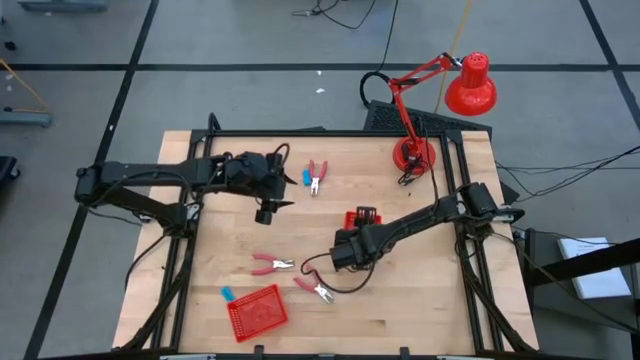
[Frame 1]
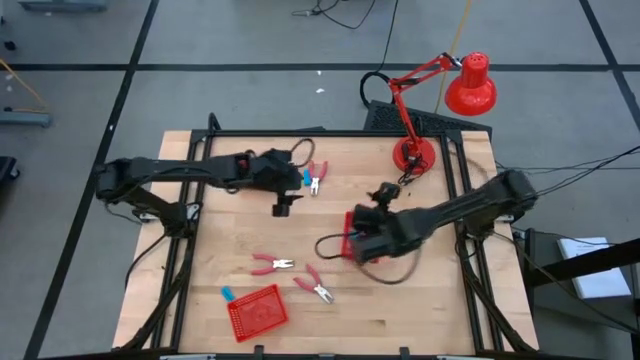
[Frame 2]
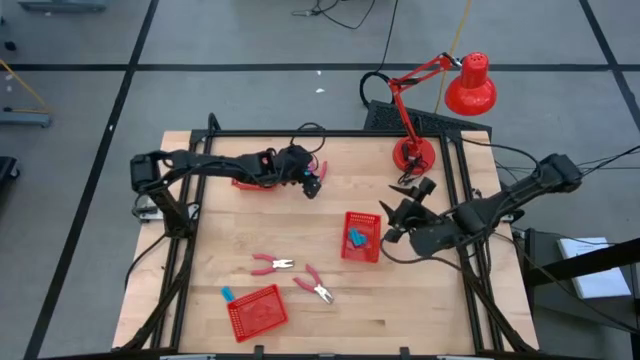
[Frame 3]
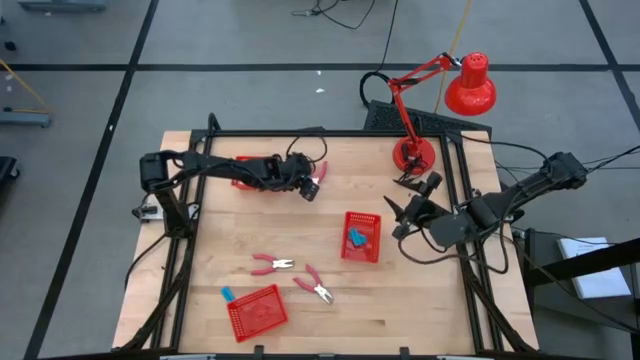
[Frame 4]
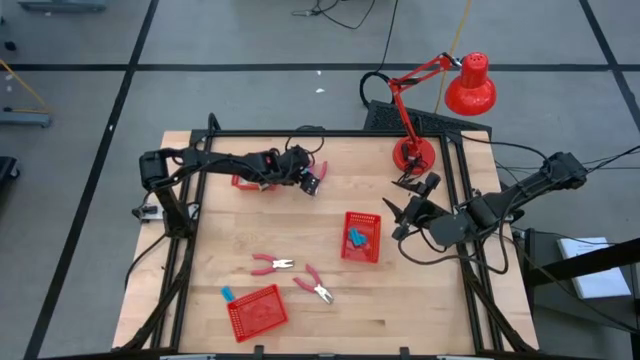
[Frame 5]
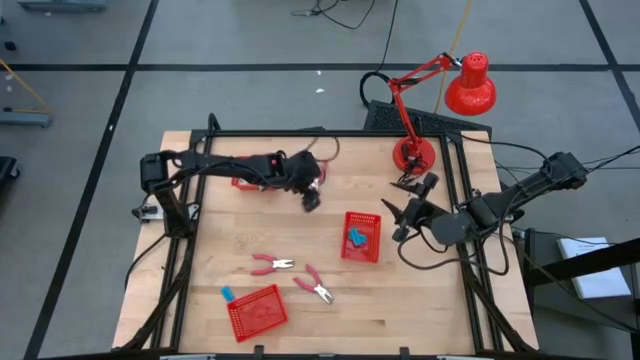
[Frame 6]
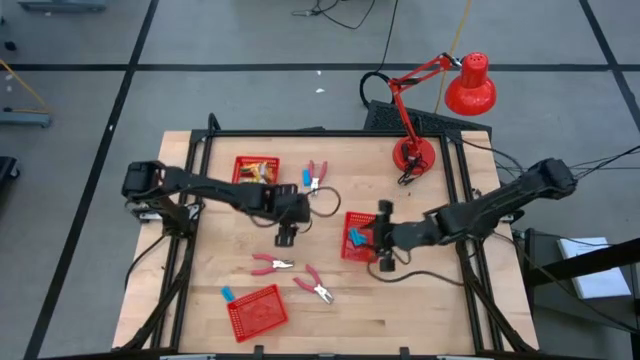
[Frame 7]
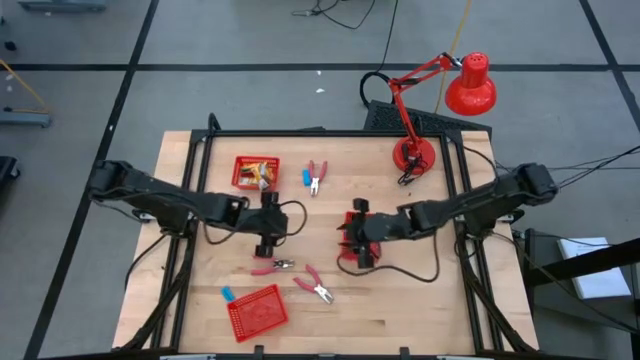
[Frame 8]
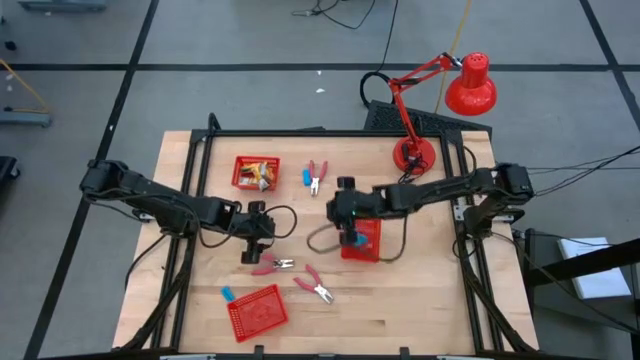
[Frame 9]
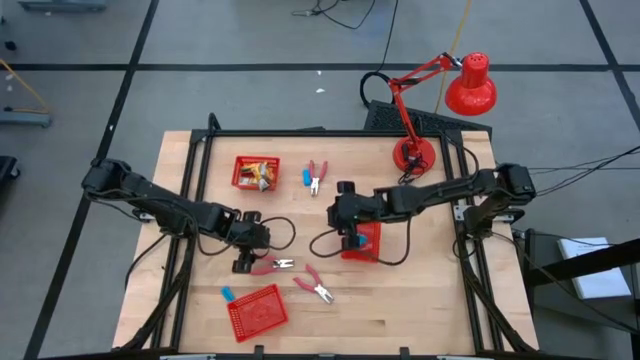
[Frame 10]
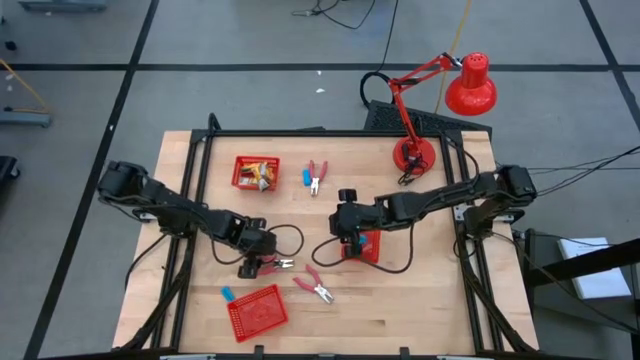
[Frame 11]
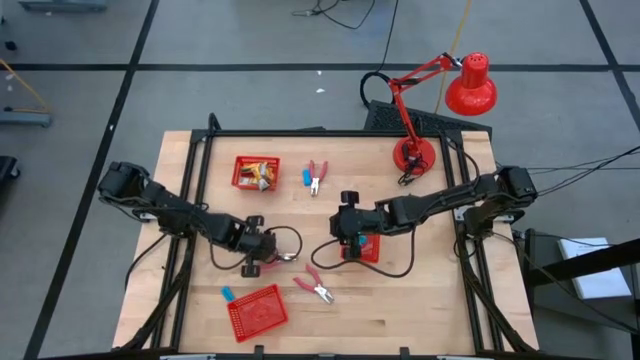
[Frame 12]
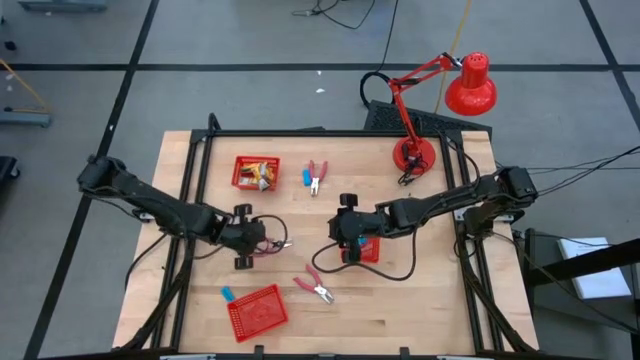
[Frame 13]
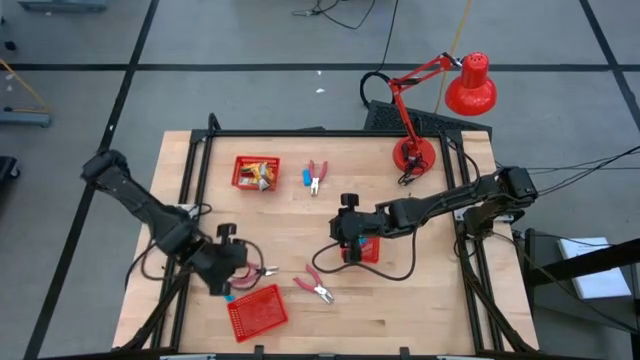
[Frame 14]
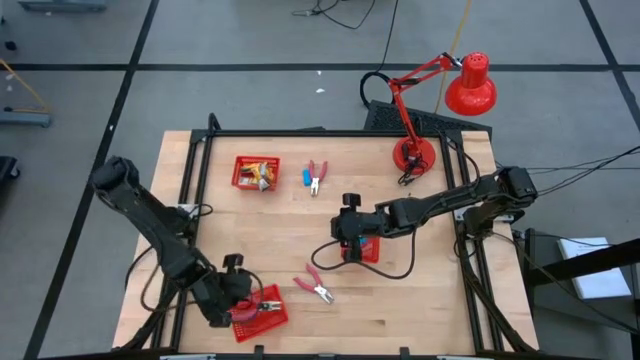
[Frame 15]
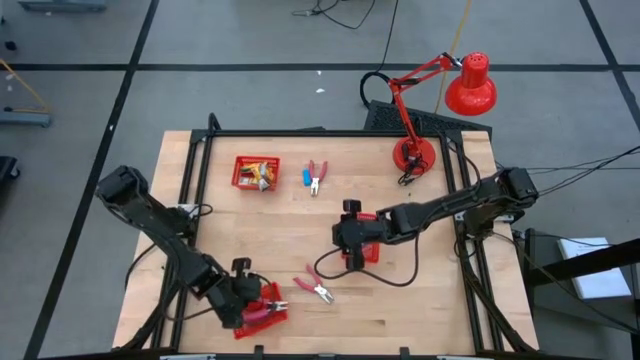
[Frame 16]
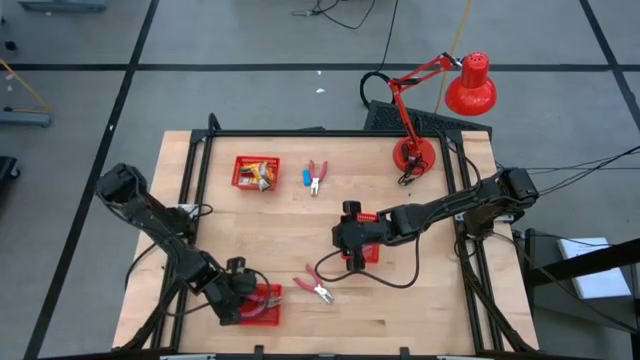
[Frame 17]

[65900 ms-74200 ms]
Task: Pick & Place School Supplies
Put the pink hole puncher into the bottom red basket

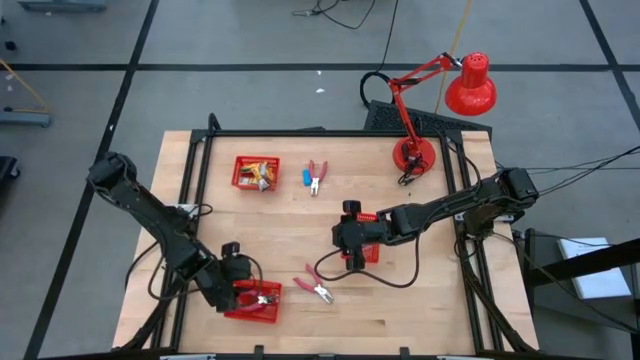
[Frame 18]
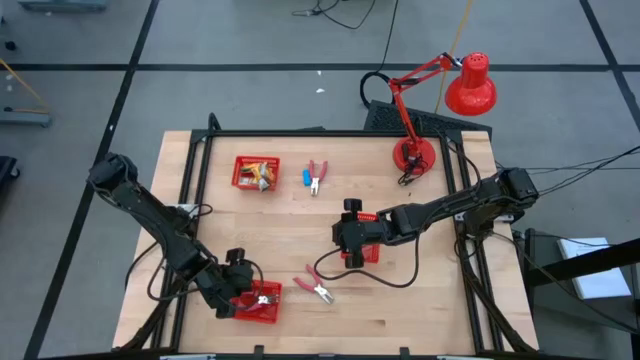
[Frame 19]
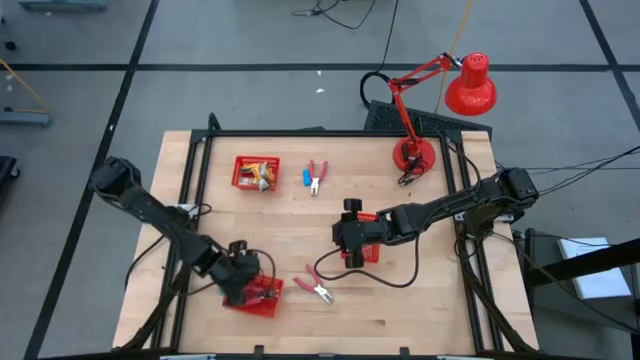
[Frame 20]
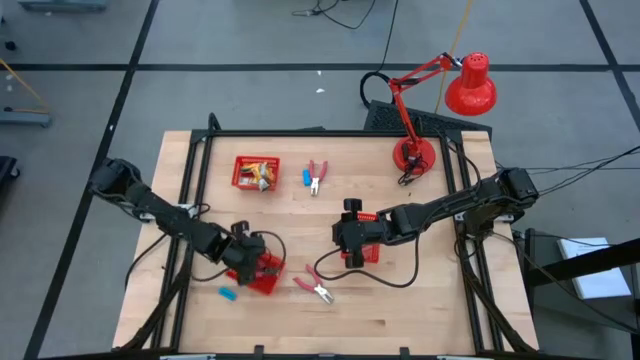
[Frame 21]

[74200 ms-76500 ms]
Move the bottom red basket to the middle left of the table

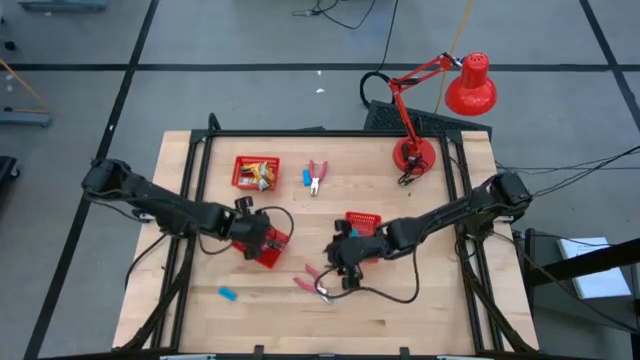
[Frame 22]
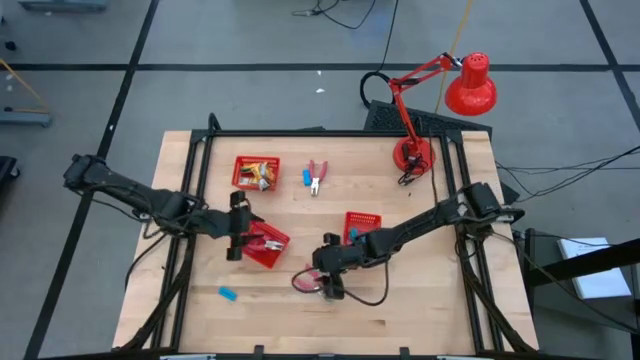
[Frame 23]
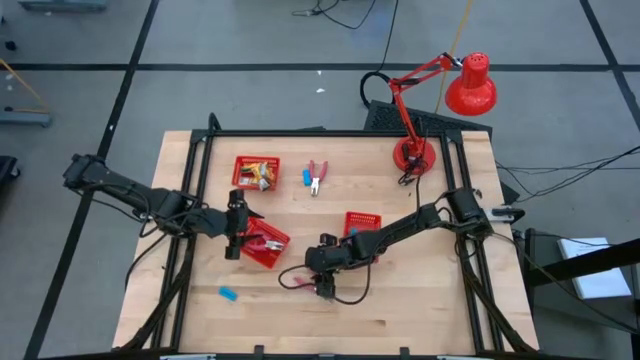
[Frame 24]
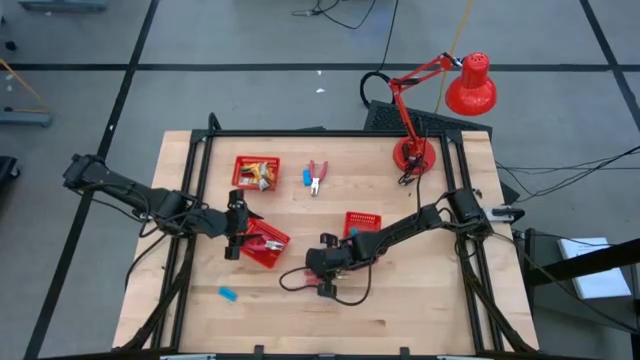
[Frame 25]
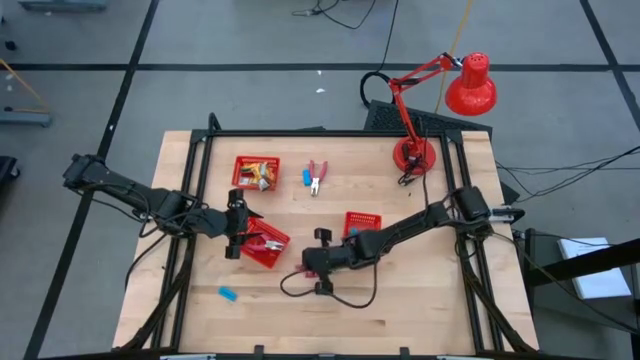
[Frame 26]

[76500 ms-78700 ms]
Put the pink hole puncher into the bottom left red basket

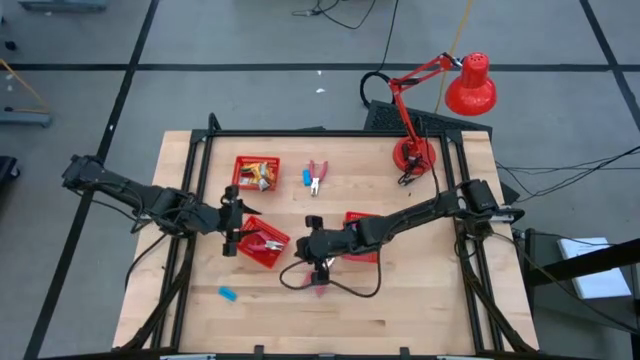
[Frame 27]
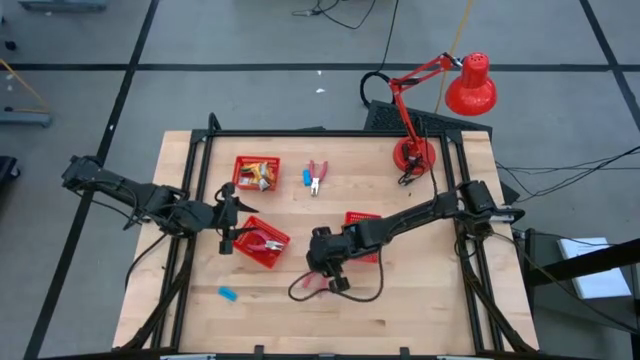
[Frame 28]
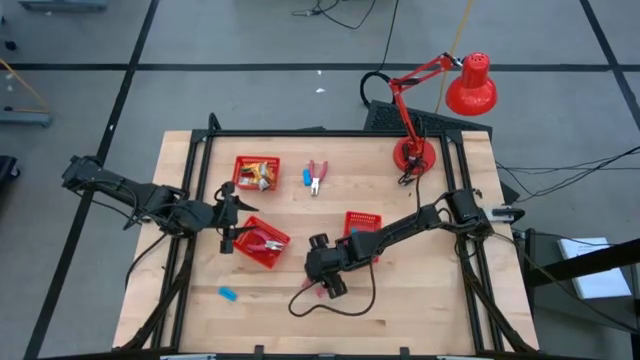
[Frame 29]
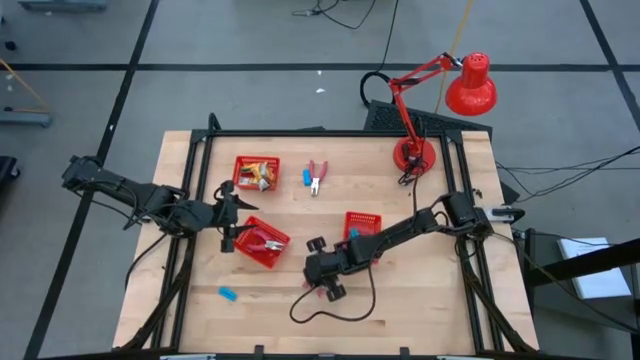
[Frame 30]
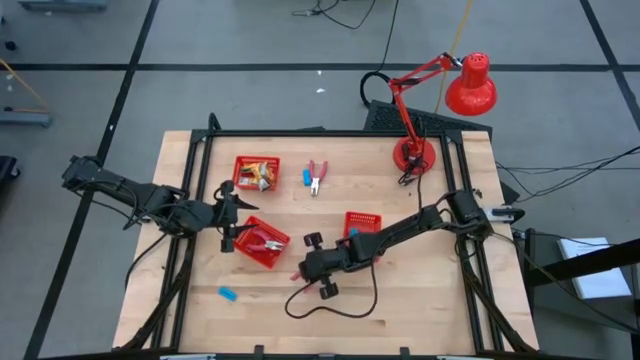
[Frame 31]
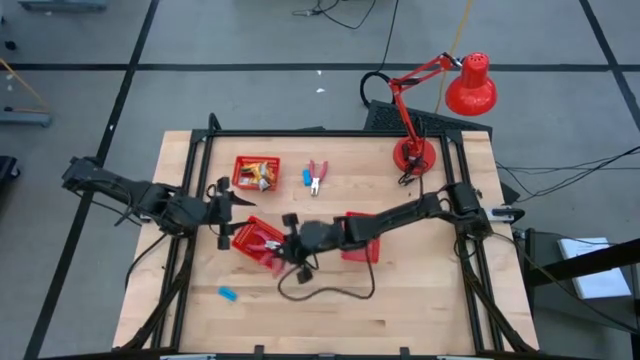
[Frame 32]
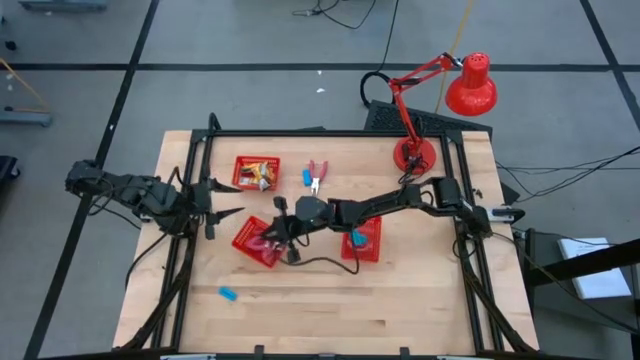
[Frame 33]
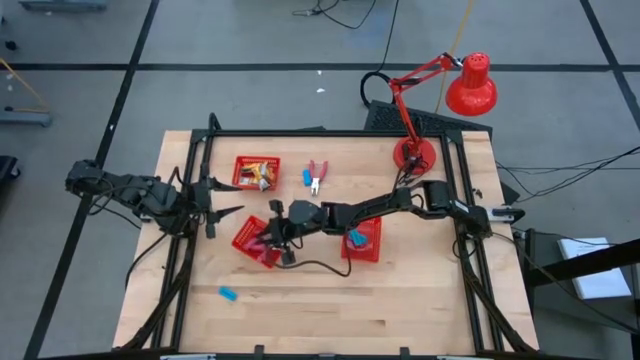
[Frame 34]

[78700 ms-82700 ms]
Put the pink hole puncher into the bottom left red basket

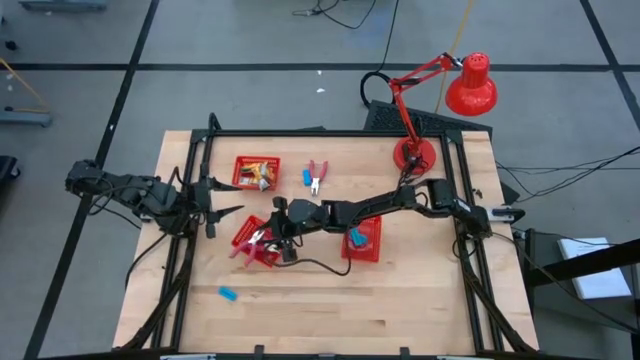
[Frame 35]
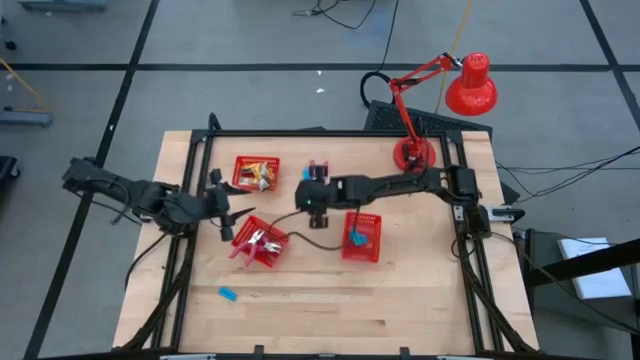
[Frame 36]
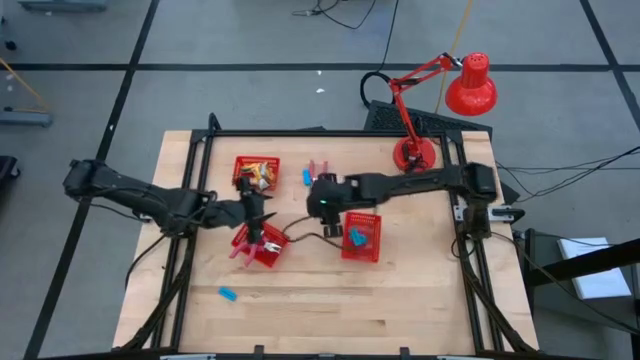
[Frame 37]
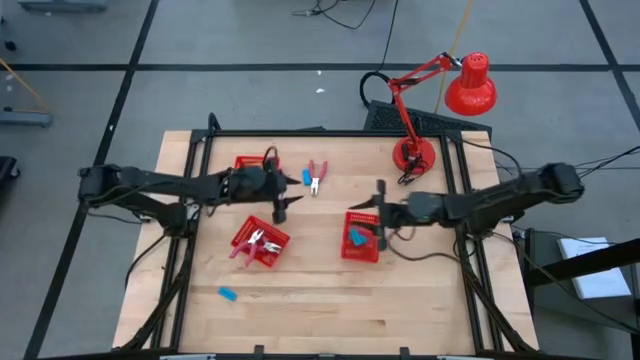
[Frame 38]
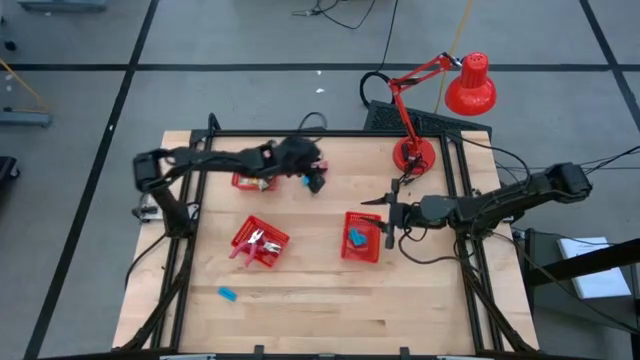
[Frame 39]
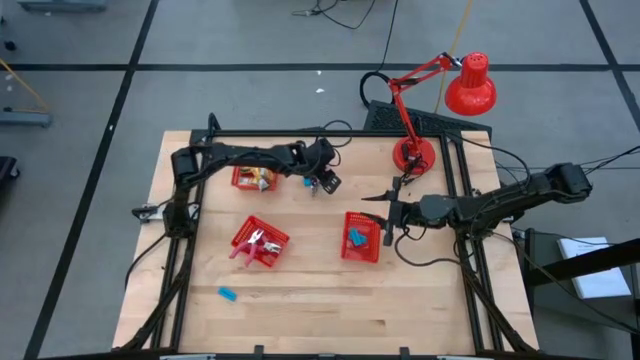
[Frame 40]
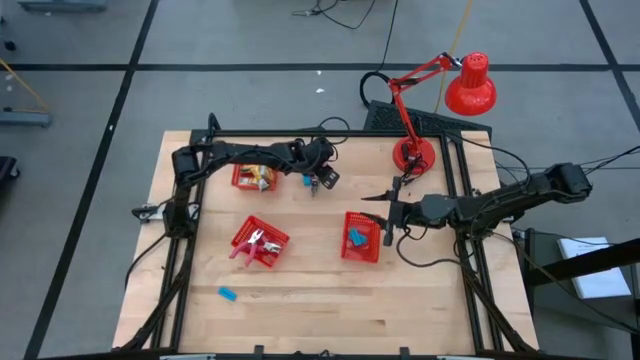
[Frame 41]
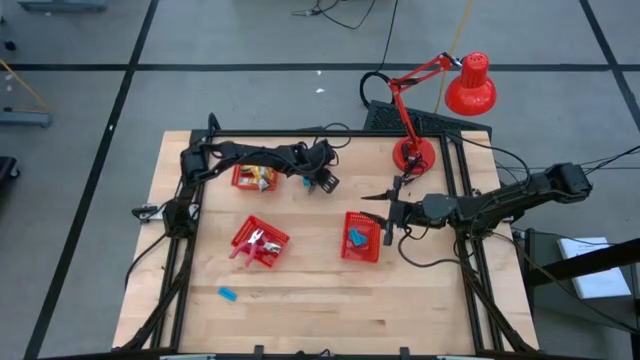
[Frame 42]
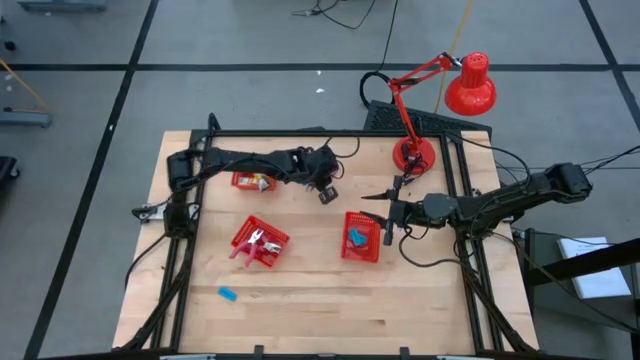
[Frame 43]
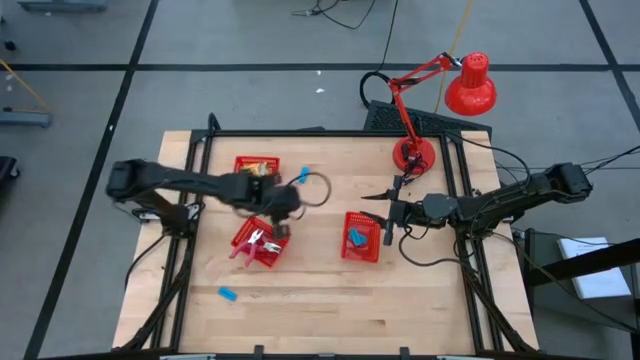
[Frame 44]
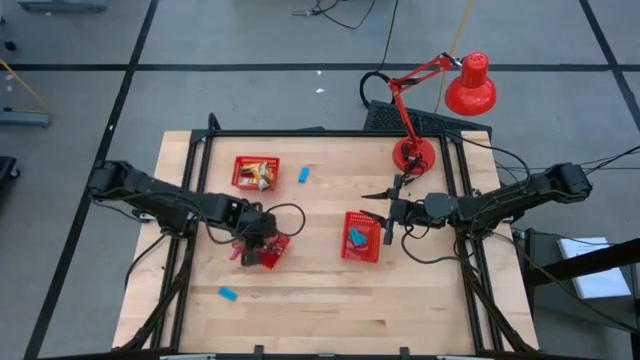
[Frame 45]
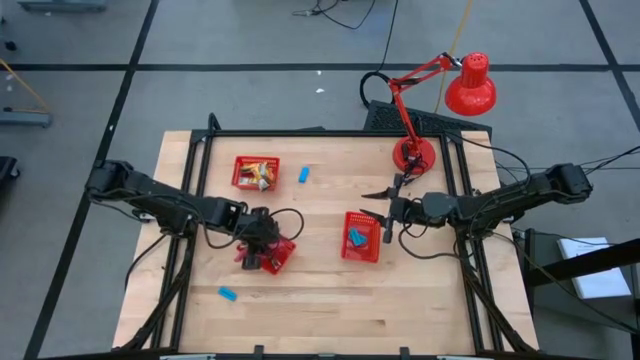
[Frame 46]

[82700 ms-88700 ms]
Put the pink hole puncher into the bottom left red basket
